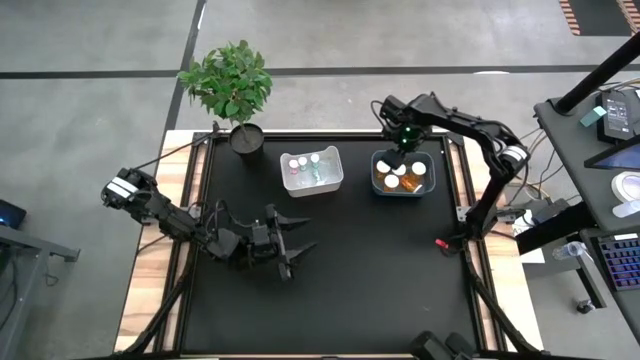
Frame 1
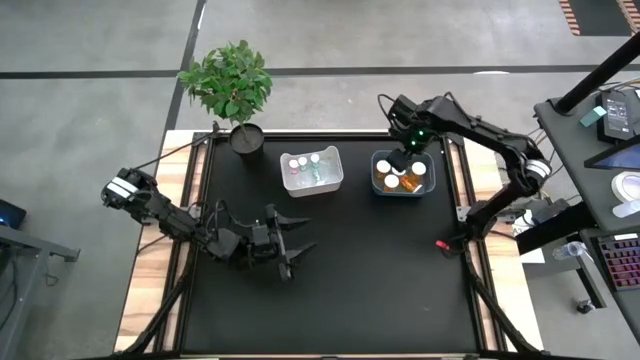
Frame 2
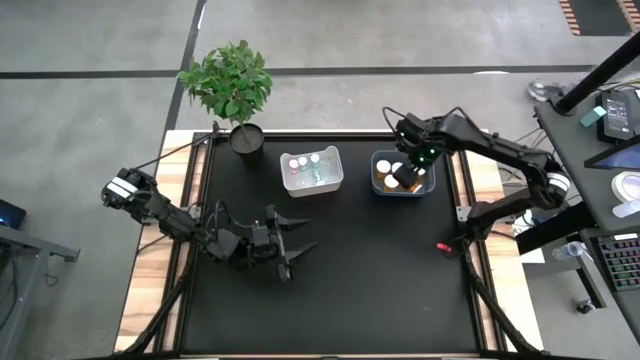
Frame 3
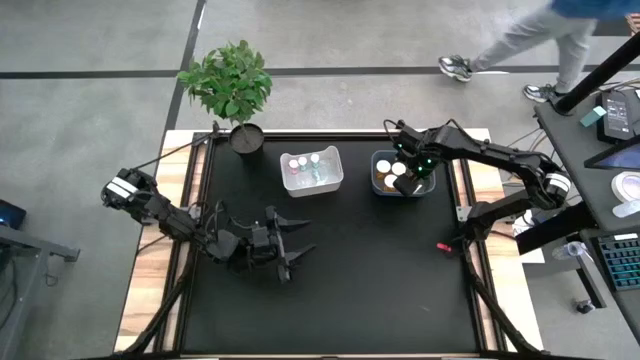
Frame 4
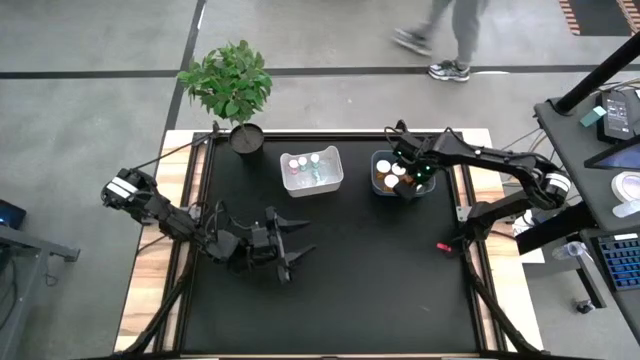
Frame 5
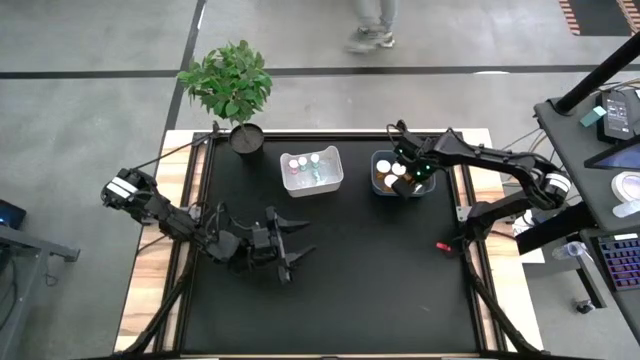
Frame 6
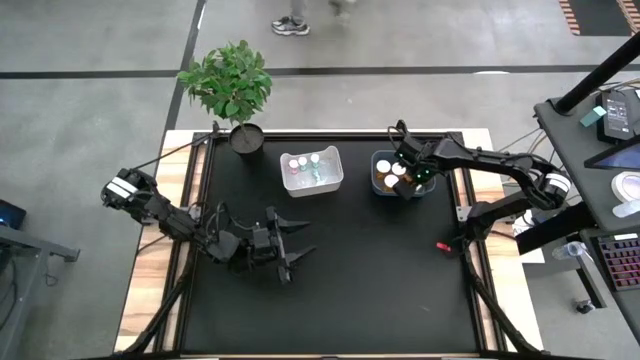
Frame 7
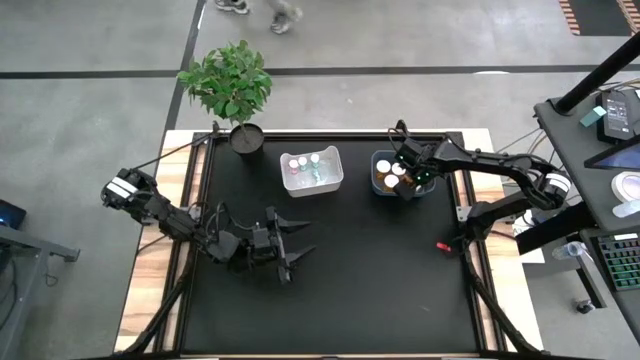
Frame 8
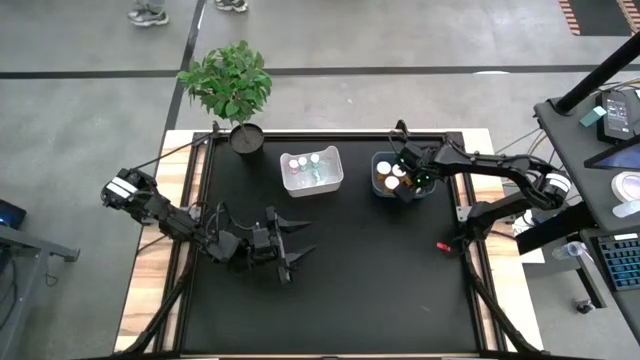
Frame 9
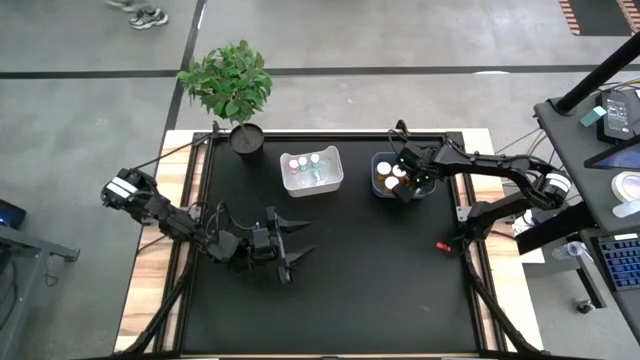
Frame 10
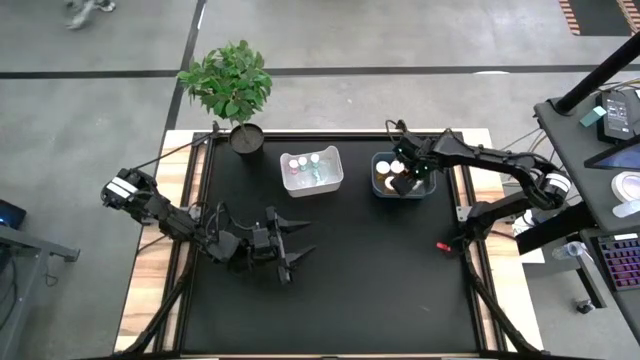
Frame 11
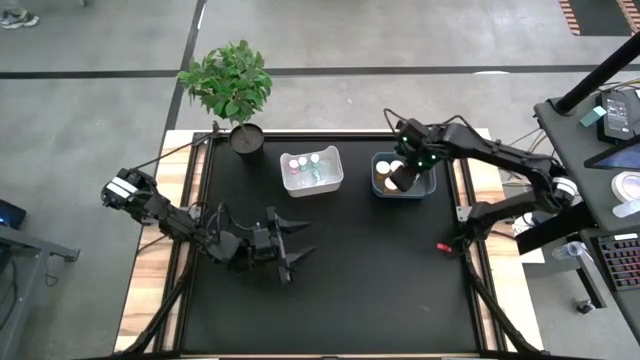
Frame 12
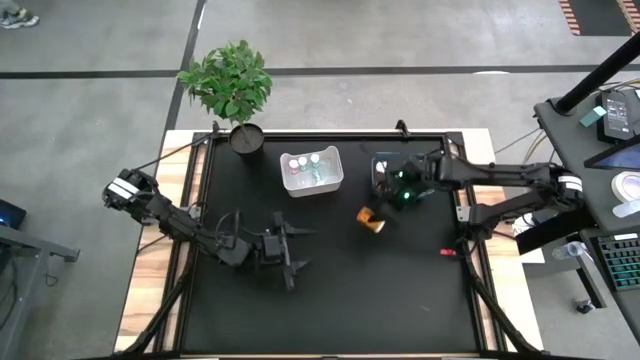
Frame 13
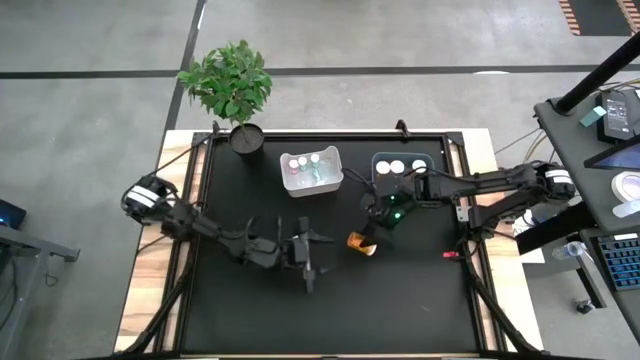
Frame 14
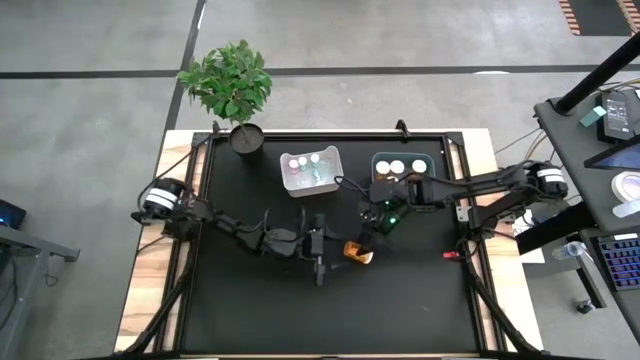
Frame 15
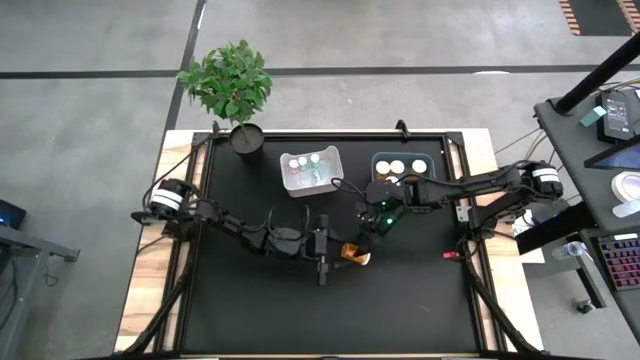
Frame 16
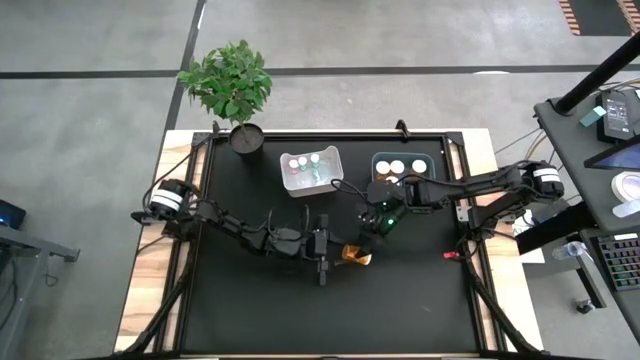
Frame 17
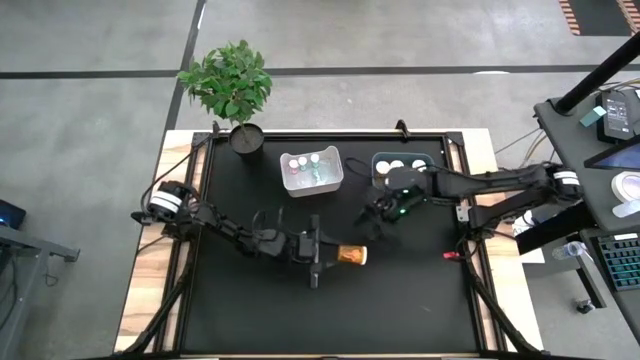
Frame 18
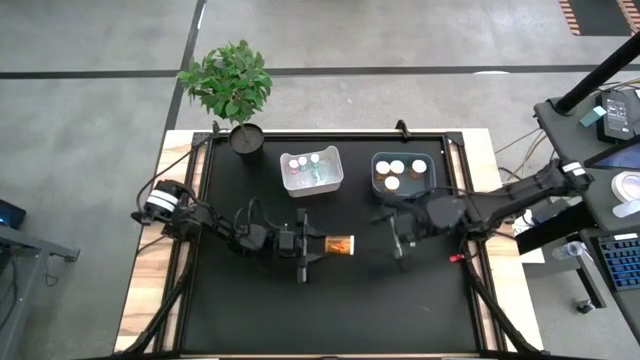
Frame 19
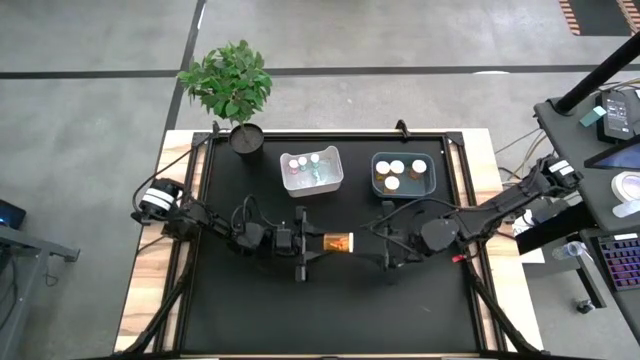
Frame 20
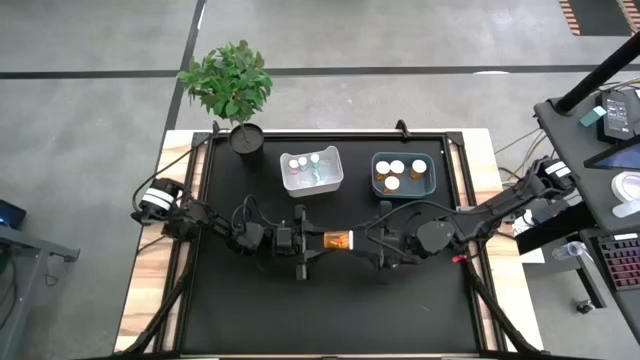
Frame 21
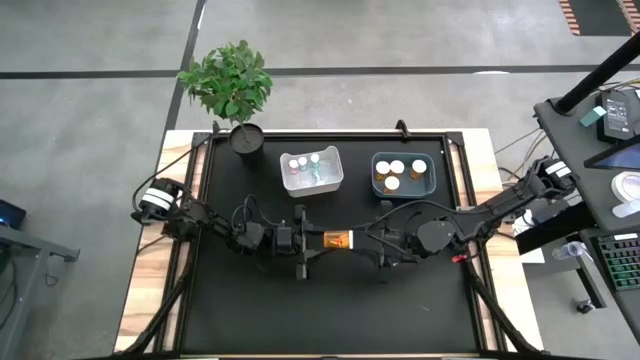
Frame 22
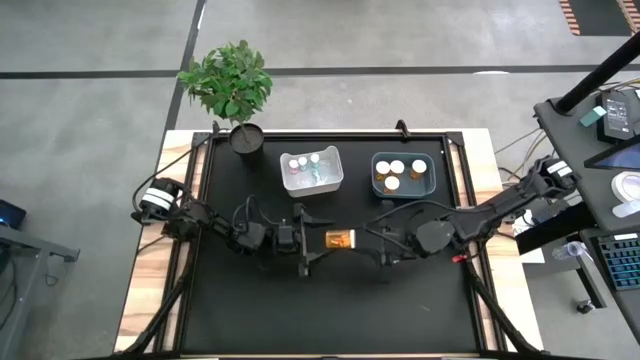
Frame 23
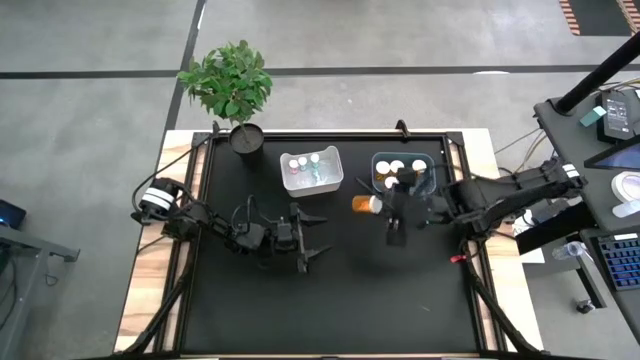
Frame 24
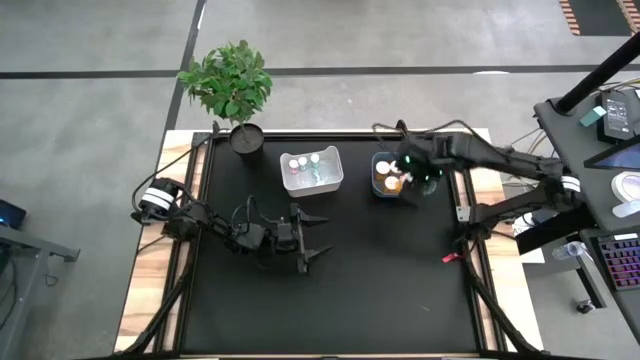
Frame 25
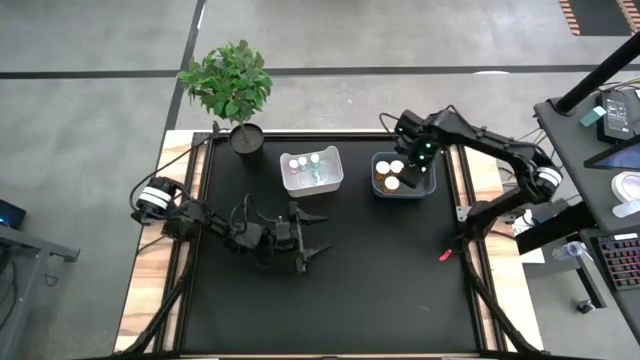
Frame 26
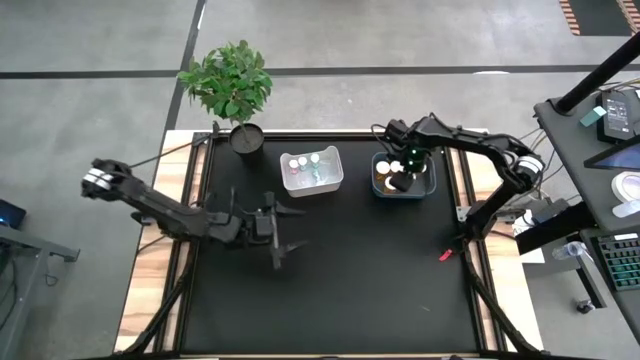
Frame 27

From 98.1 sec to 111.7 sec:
Task: Pick and place medicine bottles into bin by pill shape (circle, oval)
Adjust the orange capsule bottle

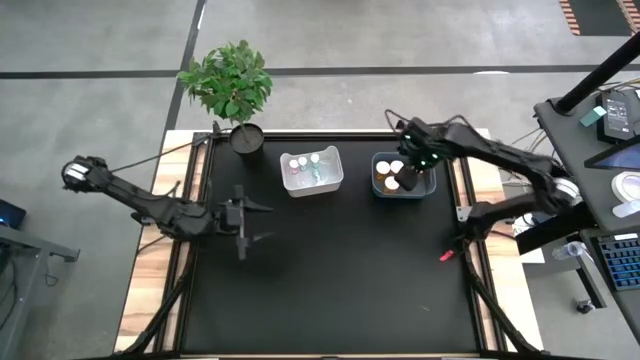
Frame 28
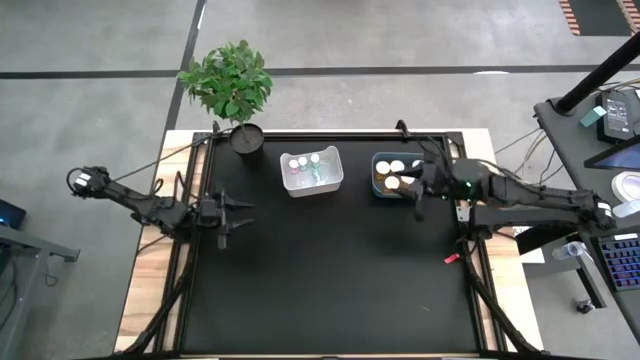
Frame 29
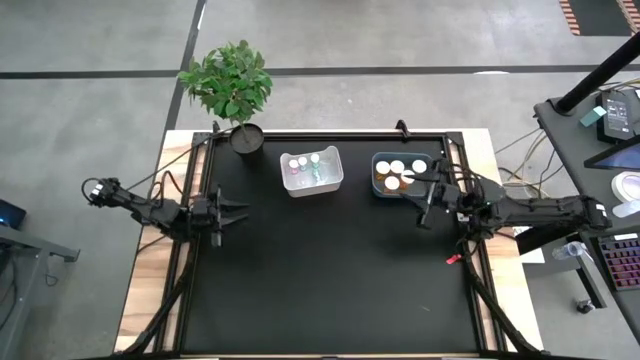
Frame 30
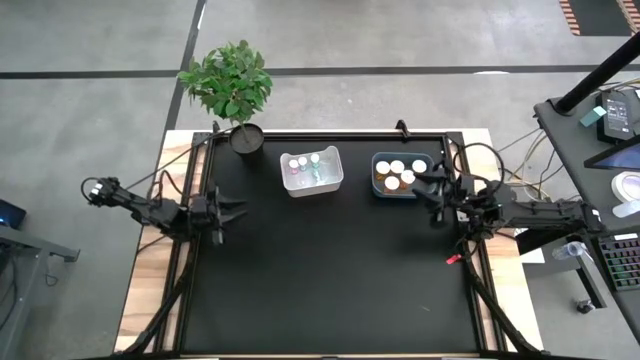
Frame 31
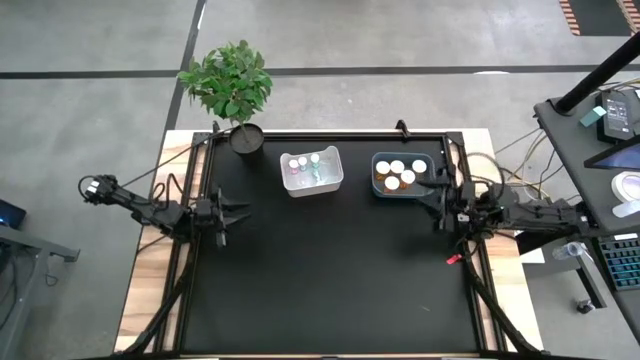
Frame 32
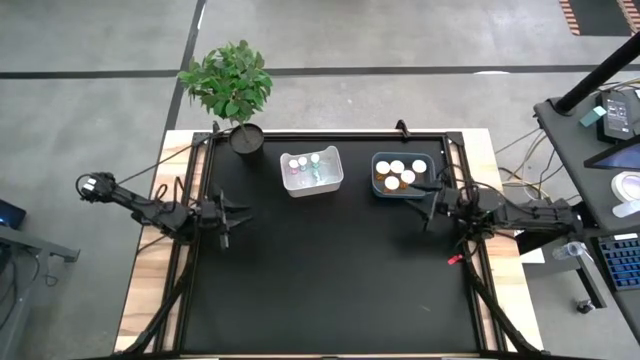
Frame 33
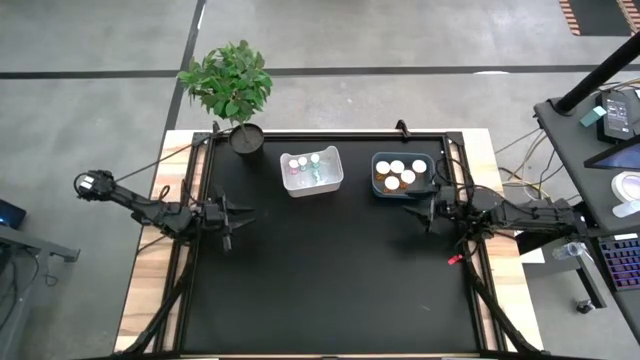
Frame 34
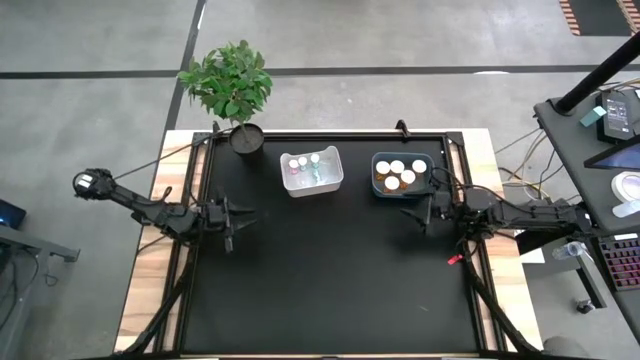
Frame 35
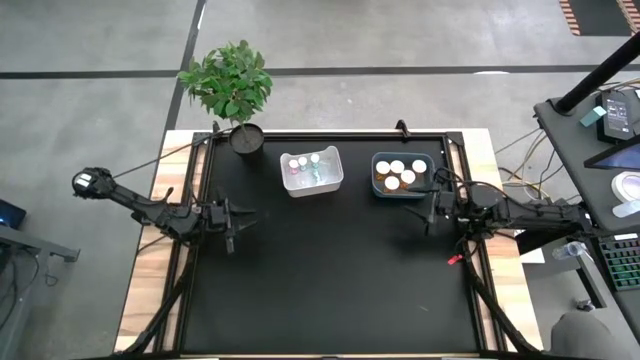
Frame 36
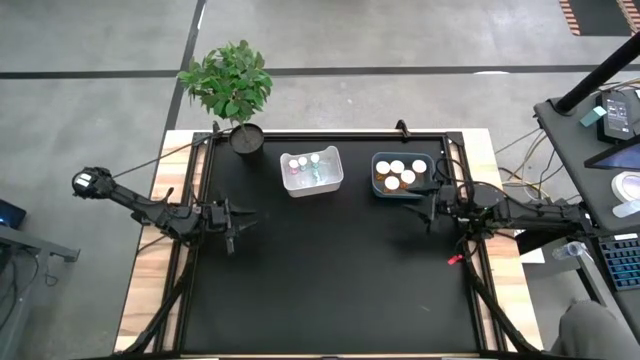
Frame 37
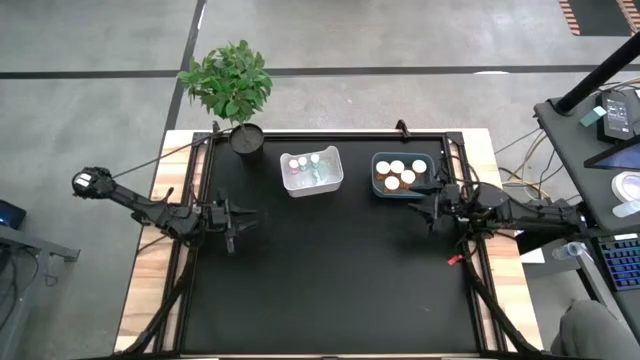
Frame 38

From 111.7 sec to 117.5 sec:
Return to Home Position

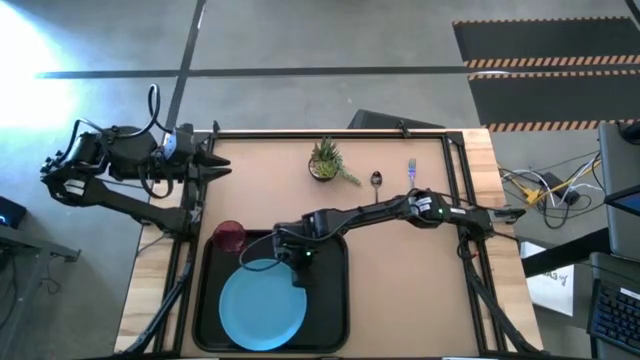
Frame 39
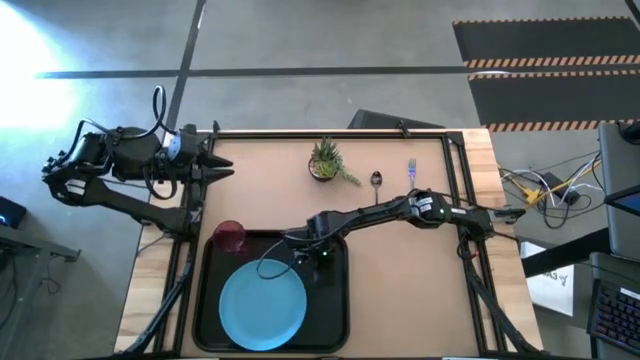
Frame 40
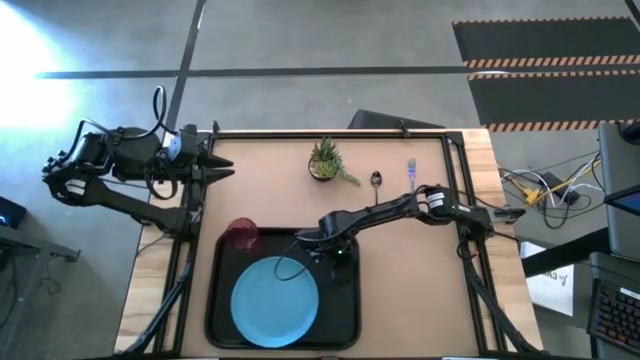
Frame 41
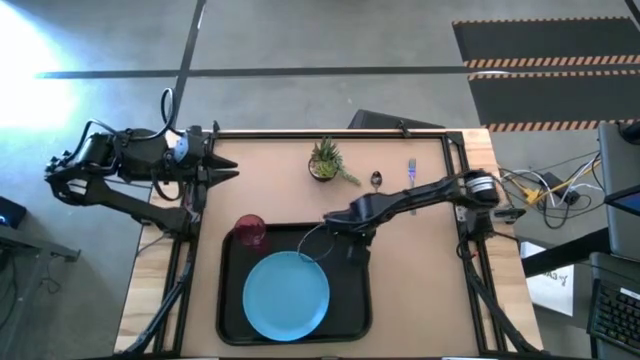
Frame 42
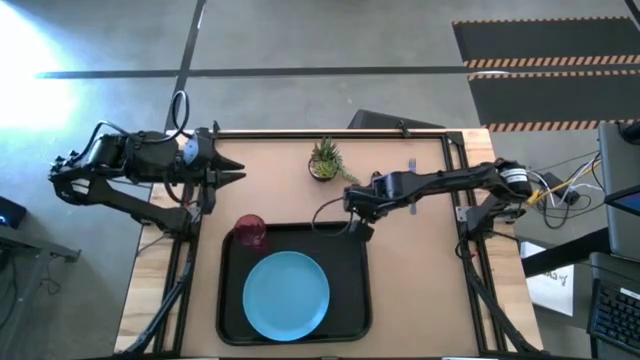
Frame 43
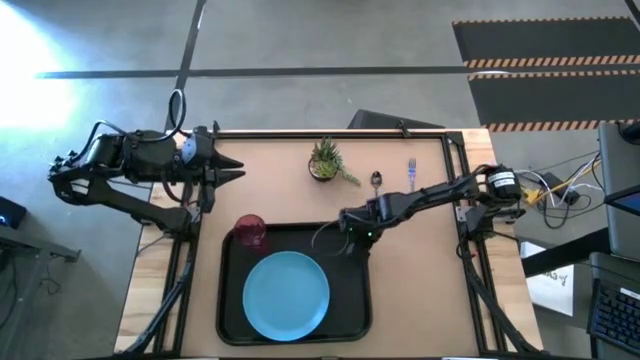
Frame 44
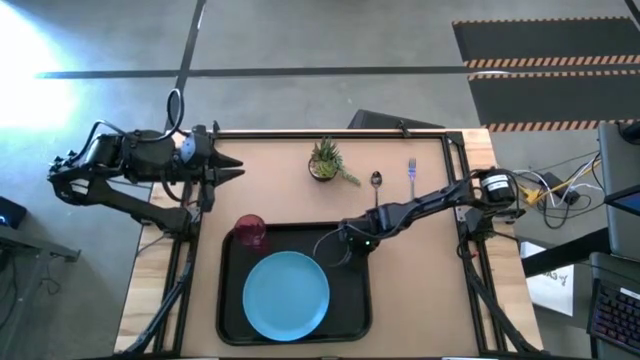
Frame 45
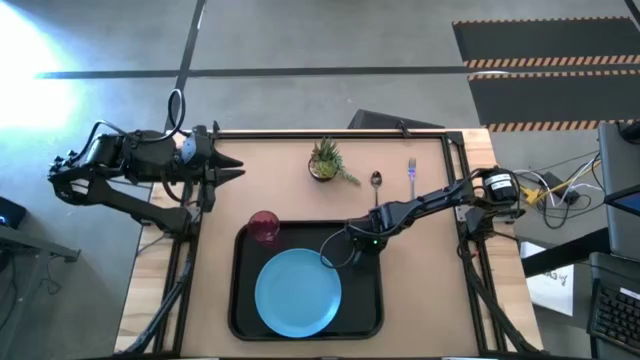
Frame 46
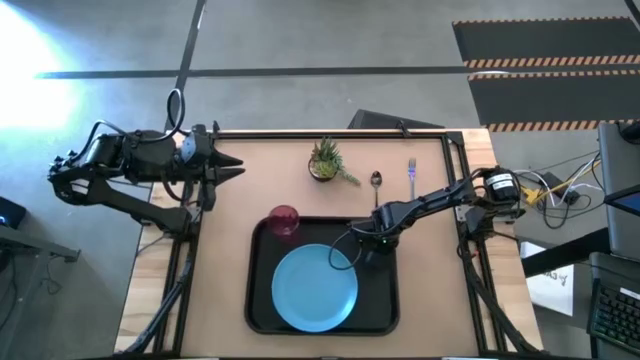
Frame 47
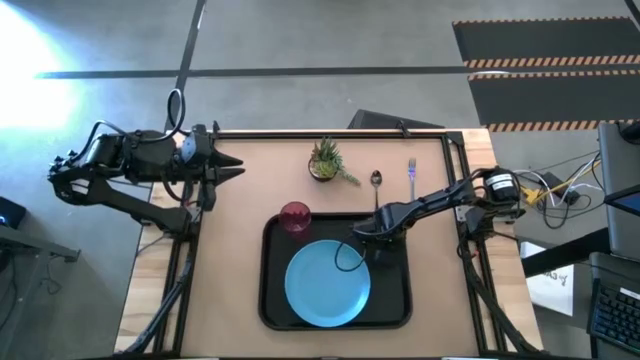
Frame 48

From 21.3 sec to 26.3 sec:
Task: Pick and place plate/cup/fork/spoon on tray
Adjust the black serving tray
